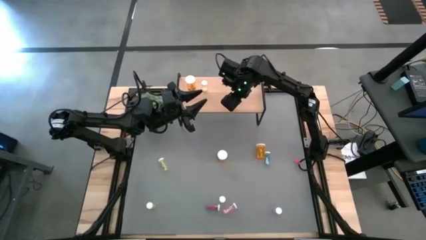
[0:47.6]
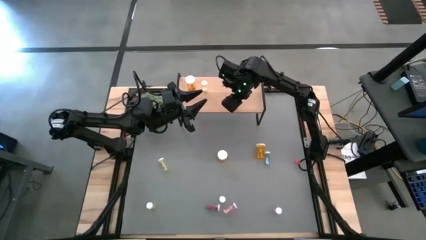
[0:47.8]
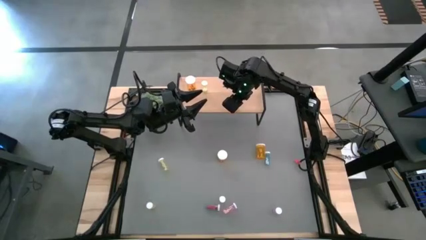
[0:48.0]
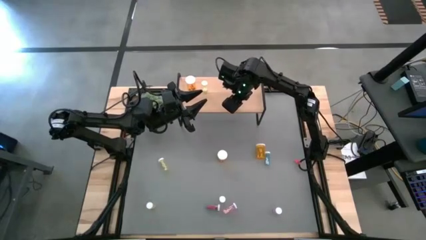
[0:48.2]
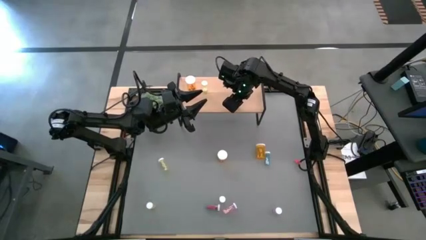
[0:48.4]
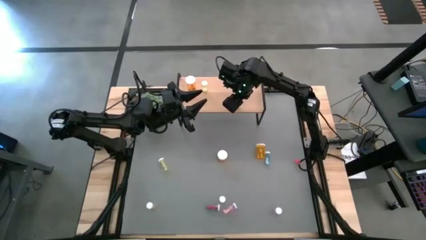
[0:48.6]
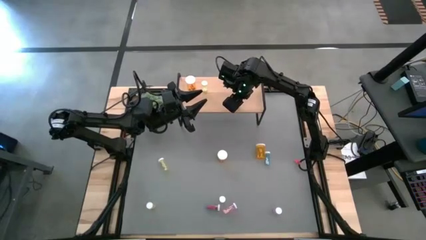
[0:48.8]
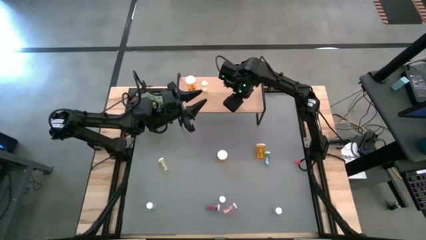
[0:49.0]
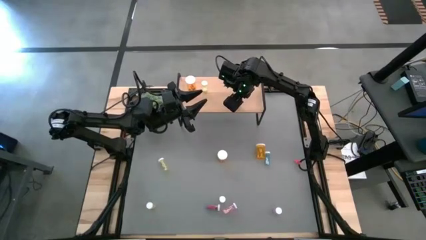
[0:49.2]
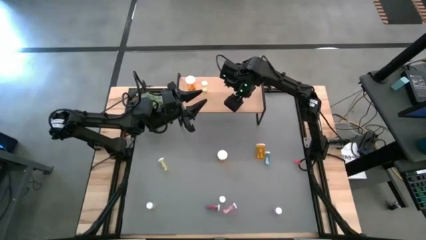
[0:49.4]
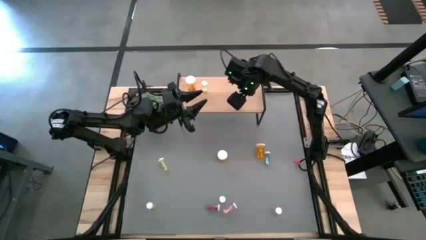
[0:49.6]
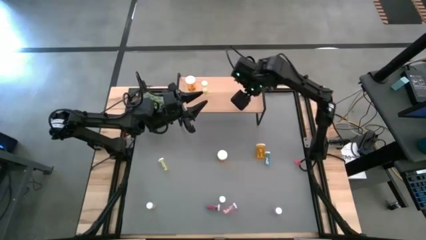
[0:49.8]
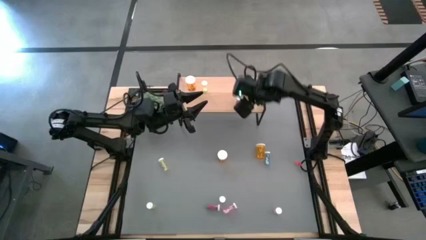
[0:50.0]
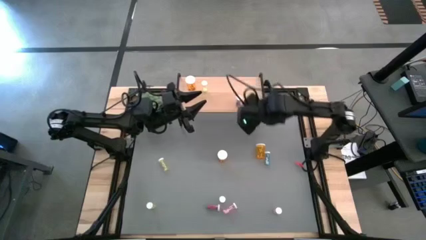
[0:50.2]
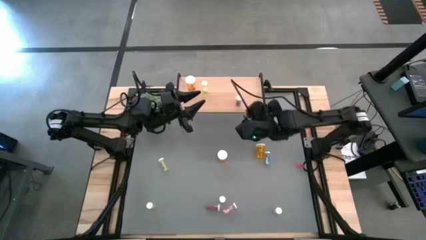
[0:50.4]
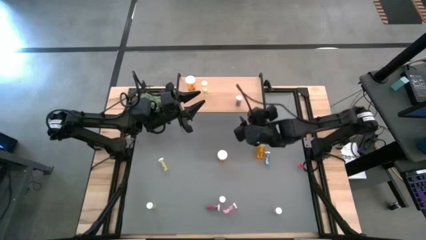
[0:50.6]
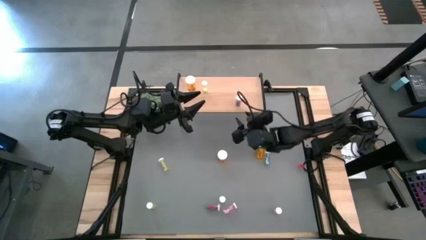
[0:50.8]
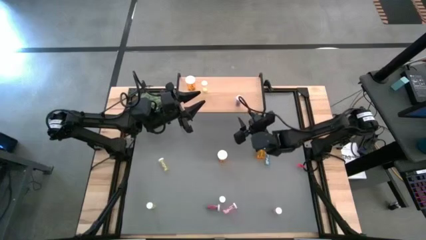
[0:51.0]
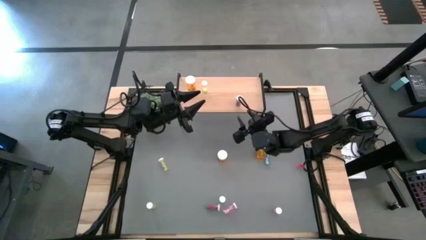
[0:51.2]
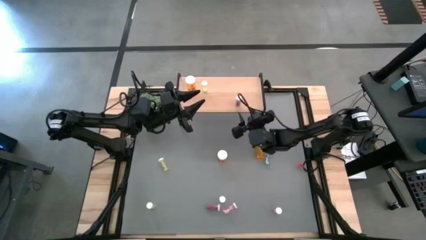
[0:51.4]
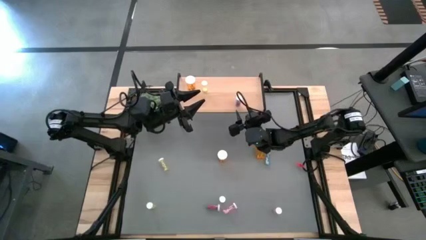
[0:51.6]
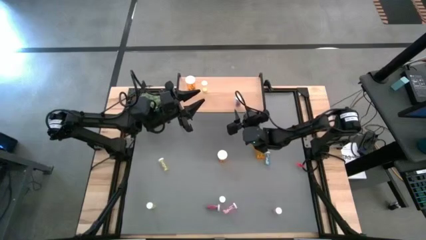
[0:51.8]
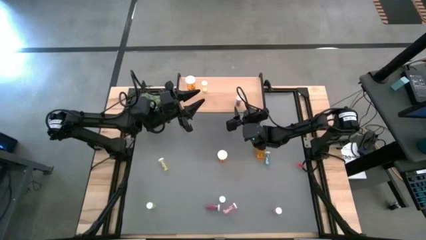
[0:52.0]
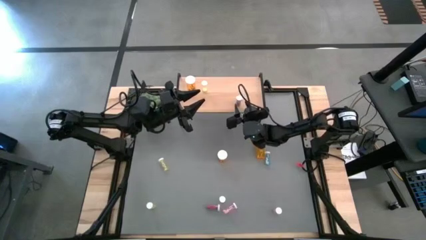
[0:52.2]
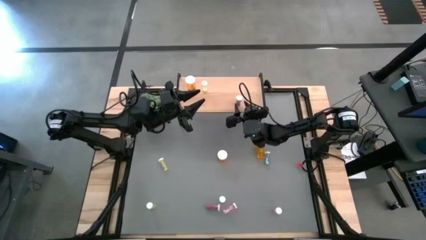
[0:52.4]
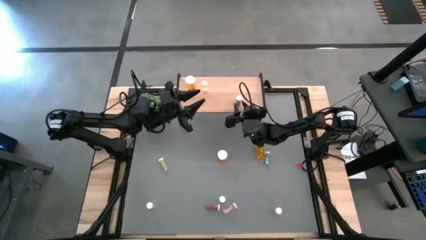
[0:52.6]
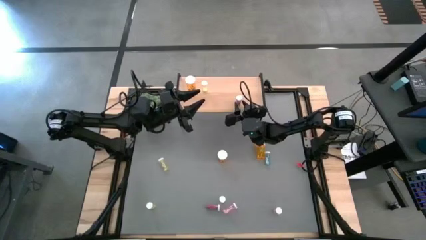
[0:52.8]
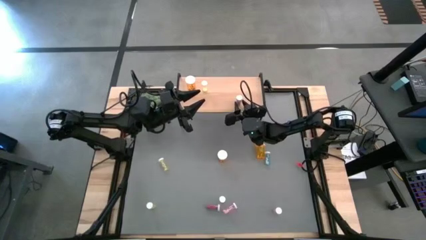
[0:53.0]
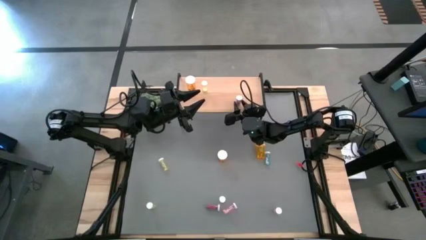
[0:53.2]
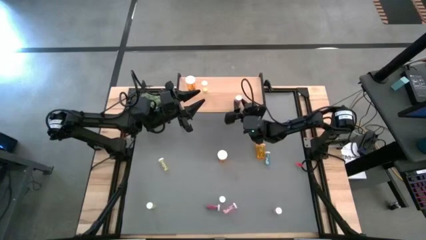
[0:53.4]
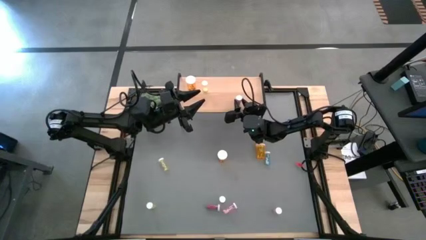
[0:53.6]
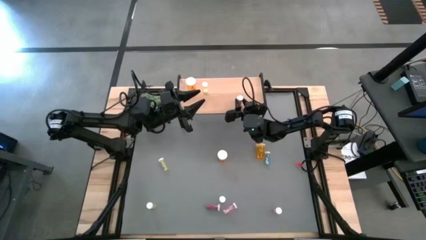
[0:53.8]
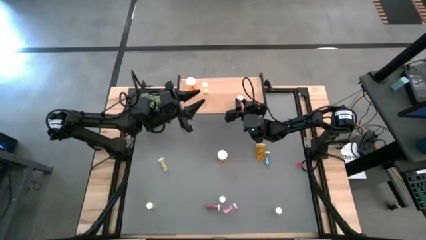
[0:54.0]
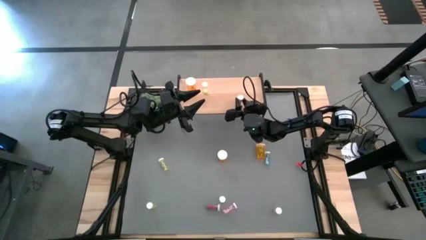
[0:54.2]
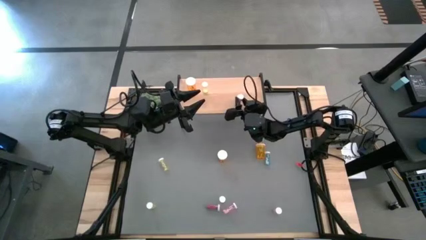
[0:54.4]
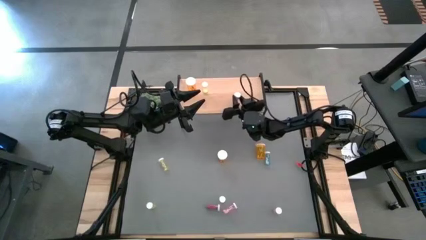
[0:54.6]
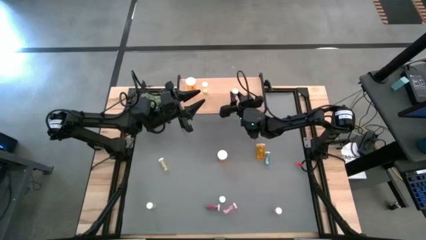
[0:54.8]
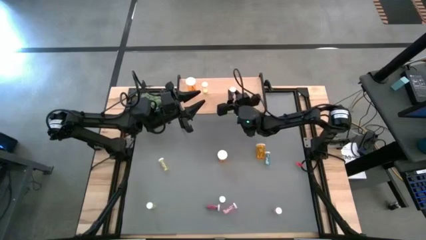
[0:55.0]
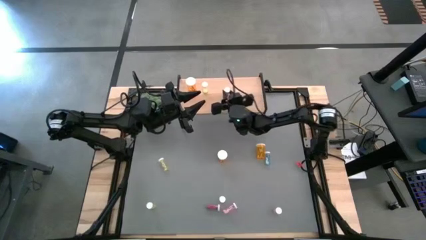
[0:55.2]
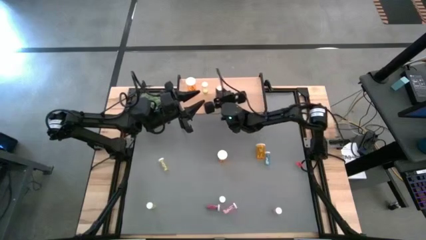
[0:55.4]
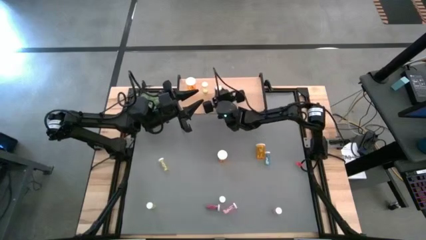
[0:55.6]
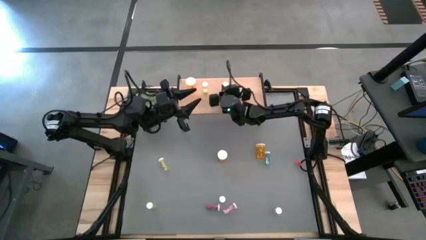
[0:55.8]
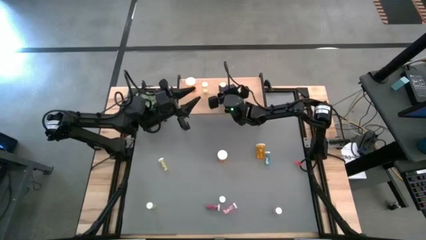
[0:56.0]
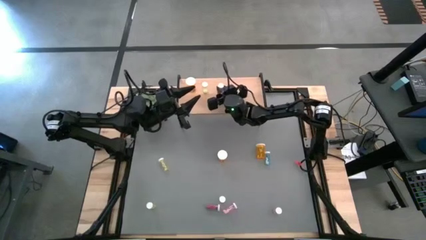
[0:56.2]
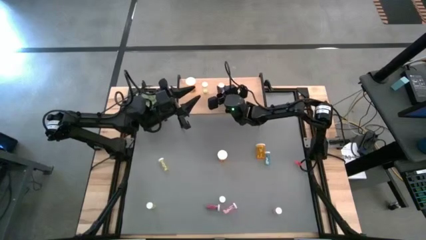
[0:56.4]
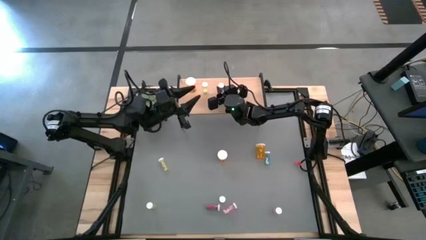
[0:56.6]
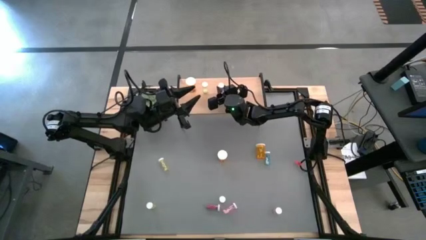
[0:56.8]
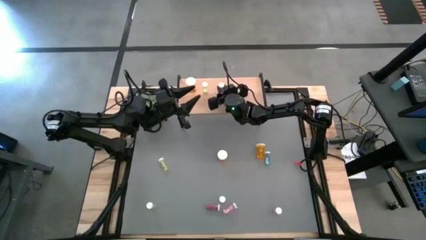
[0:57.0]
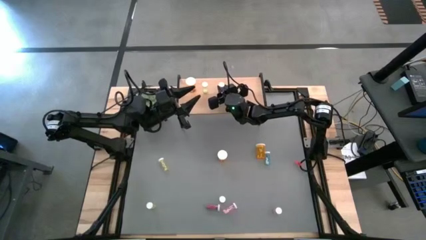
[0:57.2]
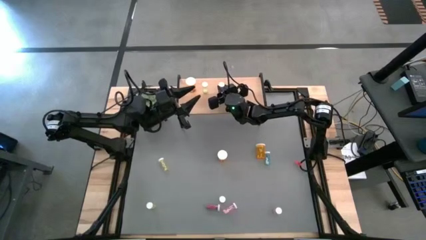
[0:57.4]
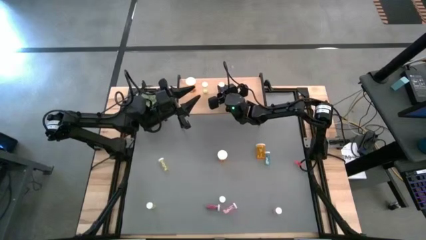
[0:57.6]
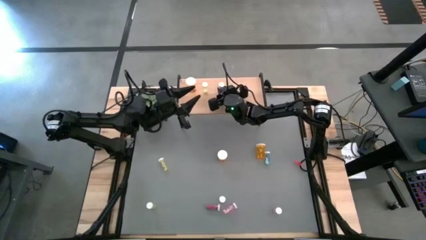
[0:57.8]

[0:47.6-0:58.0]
Task: Pick and place medicine bottles onto shelf by color
Put the right blue pill bottle to the right of the yellow pill bottle on the shelf
